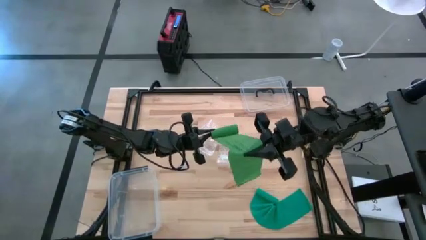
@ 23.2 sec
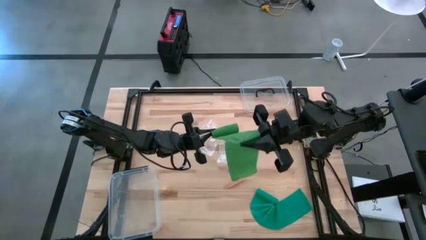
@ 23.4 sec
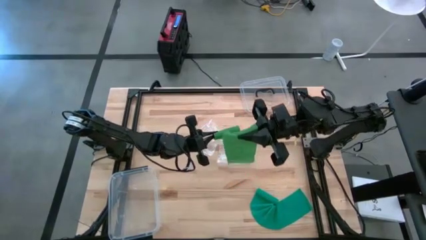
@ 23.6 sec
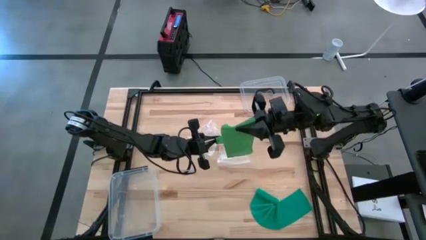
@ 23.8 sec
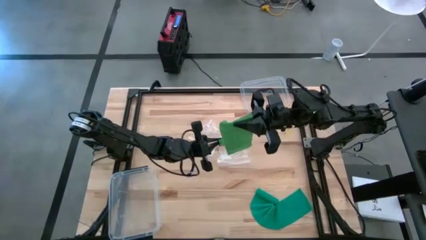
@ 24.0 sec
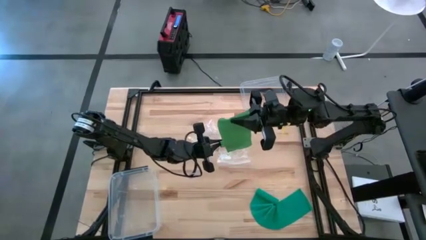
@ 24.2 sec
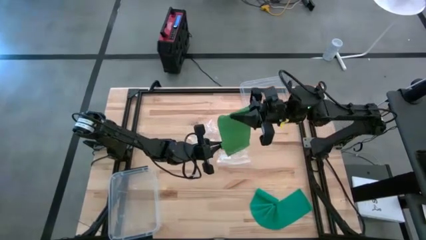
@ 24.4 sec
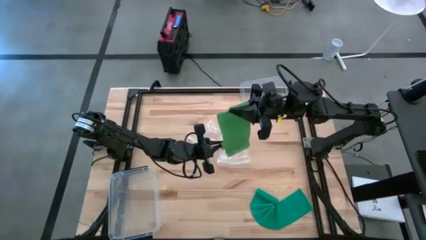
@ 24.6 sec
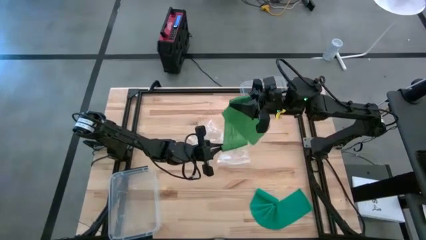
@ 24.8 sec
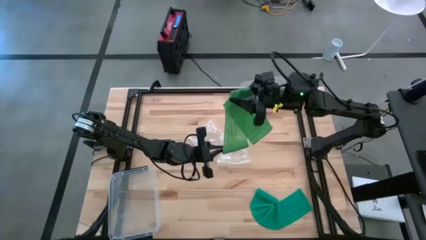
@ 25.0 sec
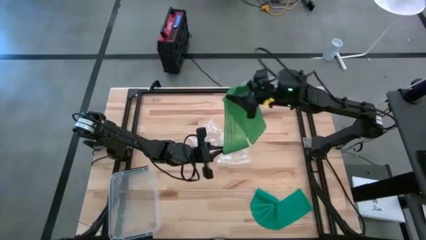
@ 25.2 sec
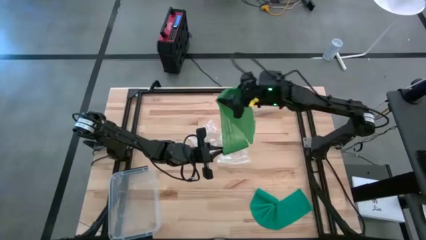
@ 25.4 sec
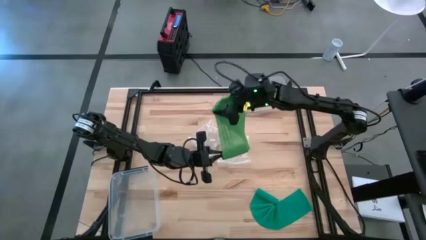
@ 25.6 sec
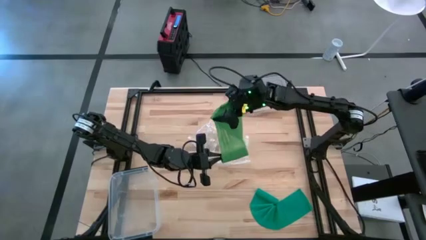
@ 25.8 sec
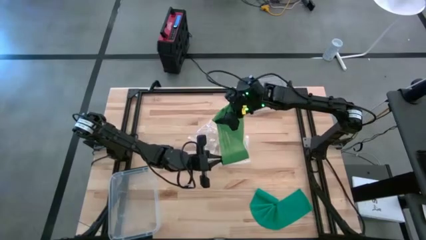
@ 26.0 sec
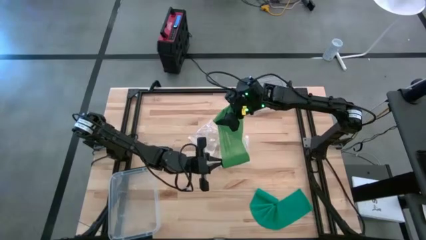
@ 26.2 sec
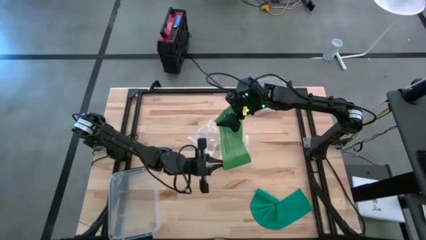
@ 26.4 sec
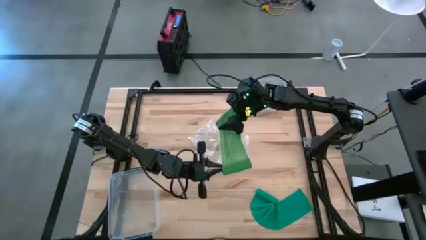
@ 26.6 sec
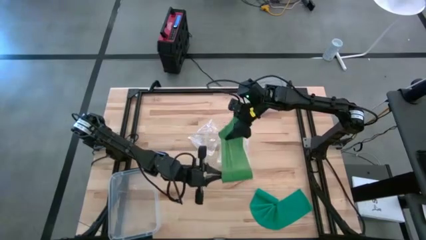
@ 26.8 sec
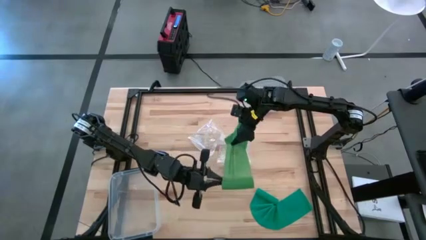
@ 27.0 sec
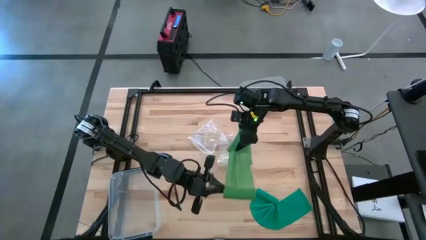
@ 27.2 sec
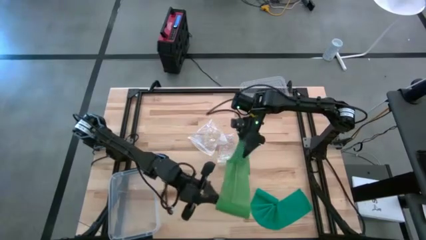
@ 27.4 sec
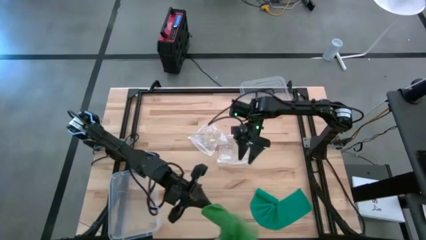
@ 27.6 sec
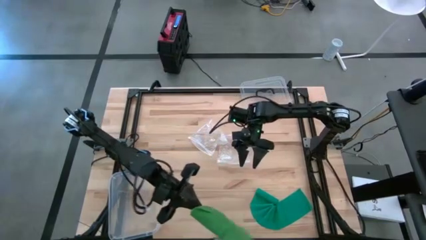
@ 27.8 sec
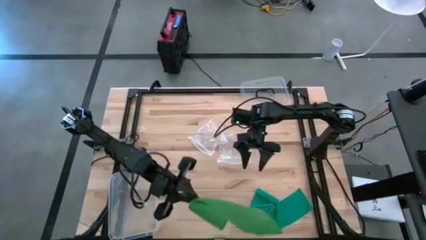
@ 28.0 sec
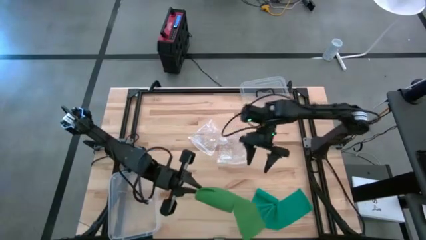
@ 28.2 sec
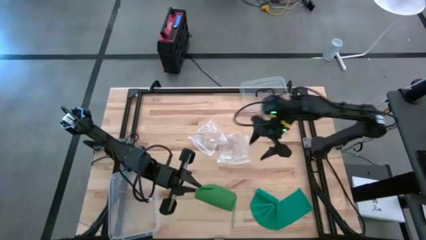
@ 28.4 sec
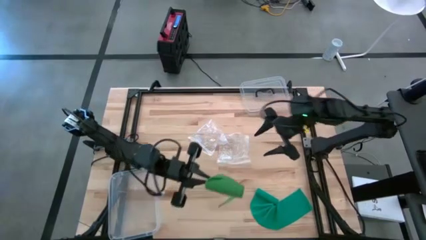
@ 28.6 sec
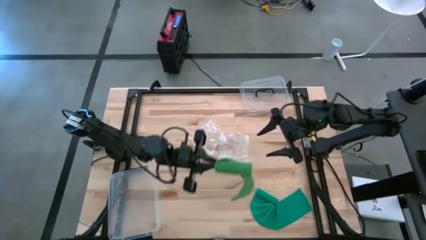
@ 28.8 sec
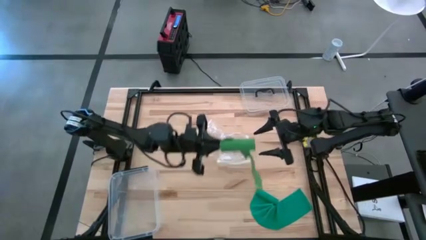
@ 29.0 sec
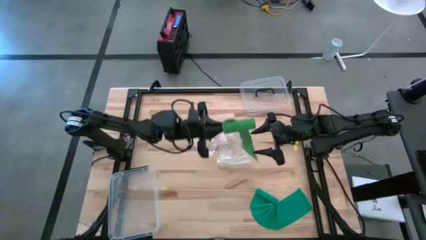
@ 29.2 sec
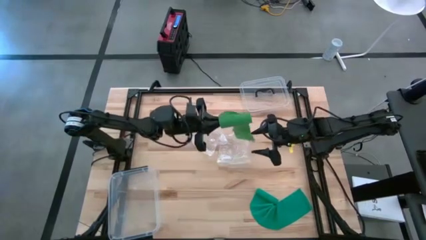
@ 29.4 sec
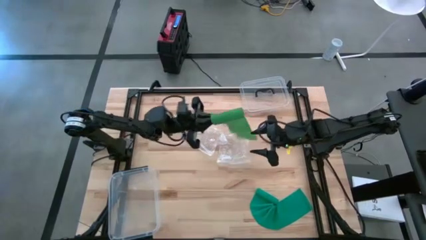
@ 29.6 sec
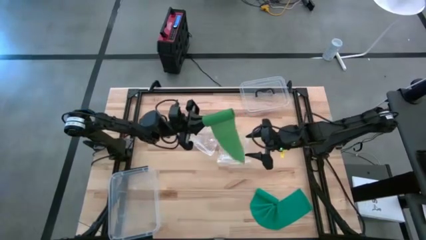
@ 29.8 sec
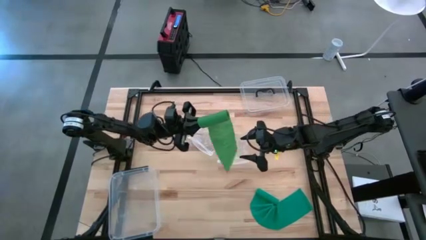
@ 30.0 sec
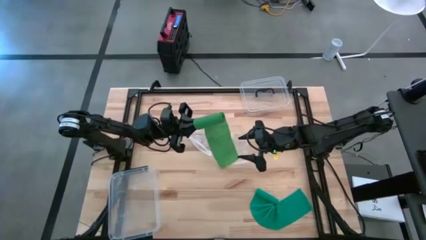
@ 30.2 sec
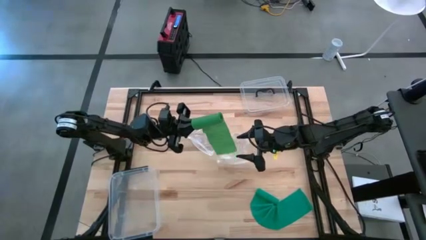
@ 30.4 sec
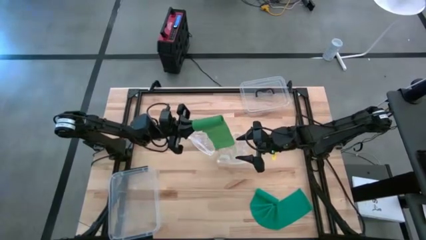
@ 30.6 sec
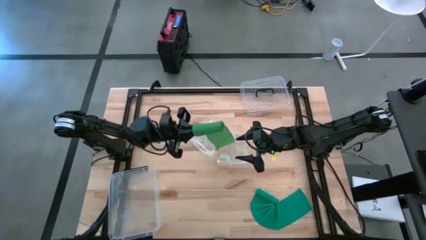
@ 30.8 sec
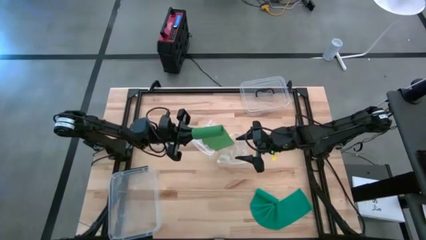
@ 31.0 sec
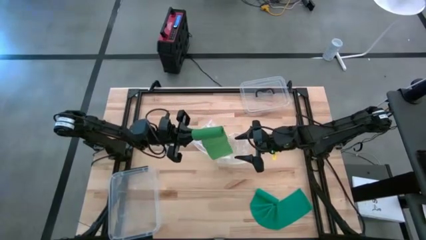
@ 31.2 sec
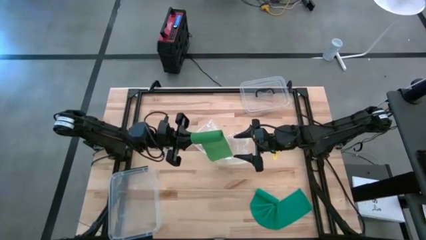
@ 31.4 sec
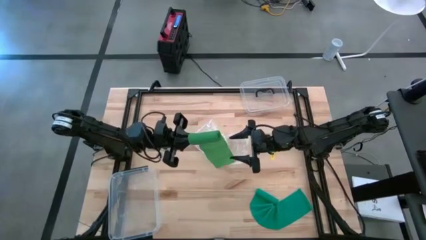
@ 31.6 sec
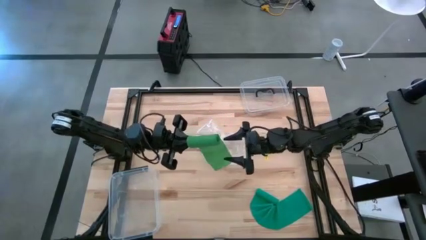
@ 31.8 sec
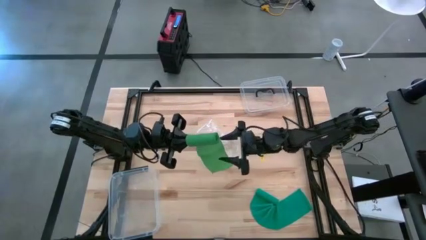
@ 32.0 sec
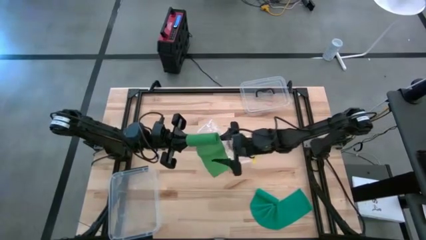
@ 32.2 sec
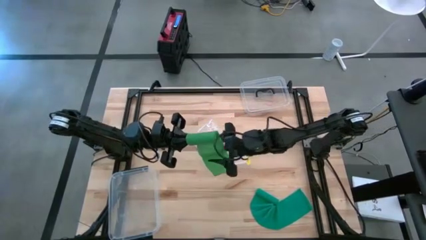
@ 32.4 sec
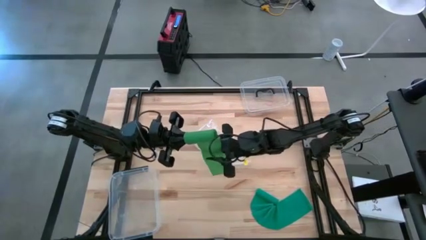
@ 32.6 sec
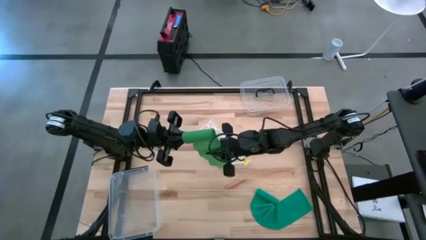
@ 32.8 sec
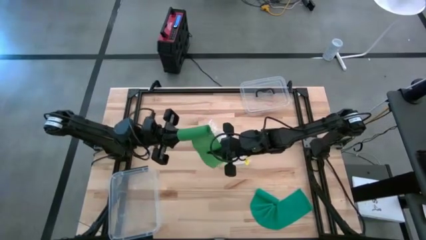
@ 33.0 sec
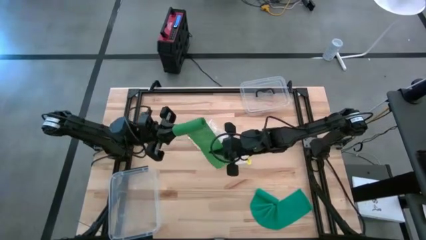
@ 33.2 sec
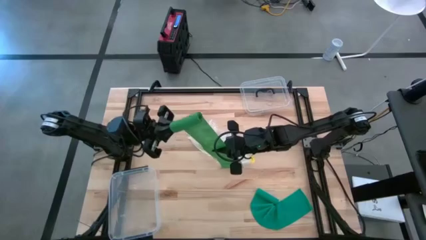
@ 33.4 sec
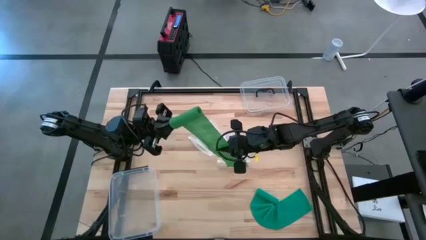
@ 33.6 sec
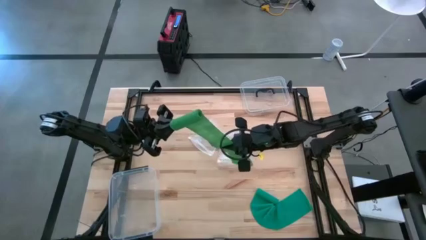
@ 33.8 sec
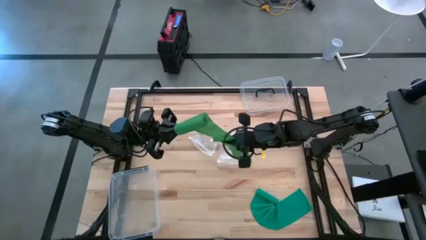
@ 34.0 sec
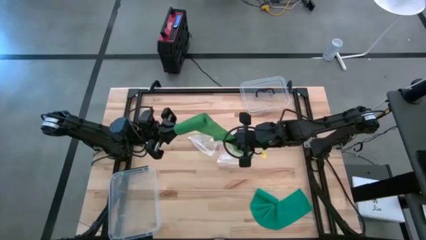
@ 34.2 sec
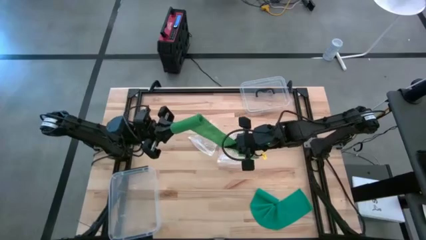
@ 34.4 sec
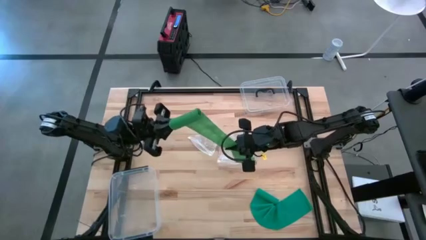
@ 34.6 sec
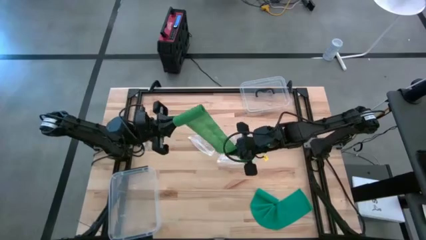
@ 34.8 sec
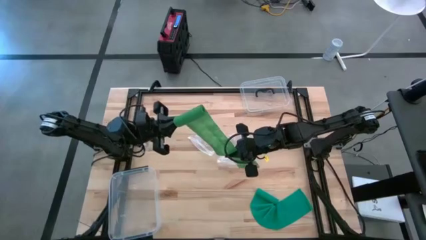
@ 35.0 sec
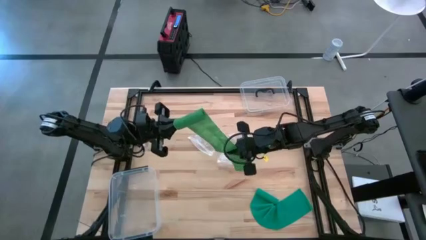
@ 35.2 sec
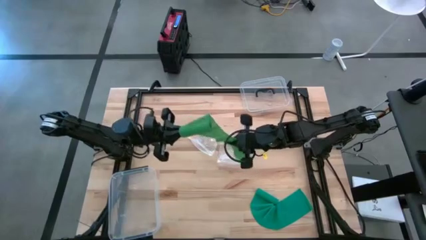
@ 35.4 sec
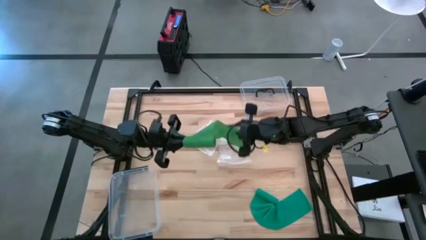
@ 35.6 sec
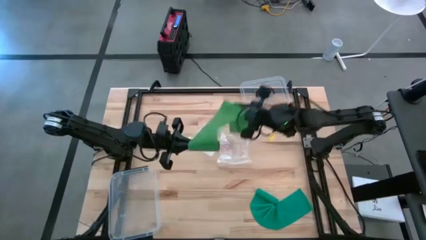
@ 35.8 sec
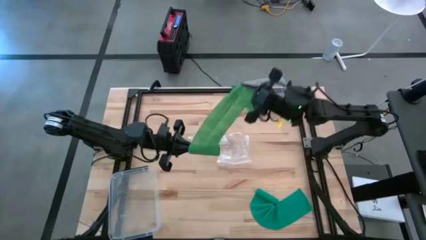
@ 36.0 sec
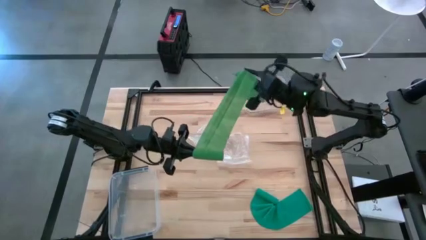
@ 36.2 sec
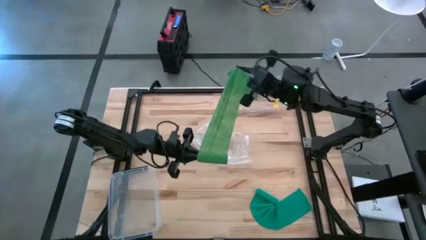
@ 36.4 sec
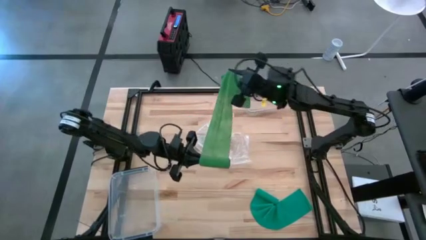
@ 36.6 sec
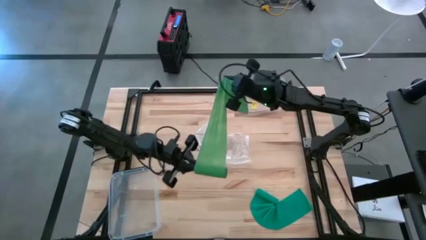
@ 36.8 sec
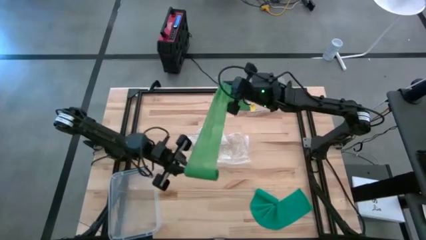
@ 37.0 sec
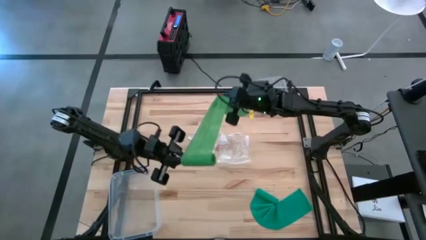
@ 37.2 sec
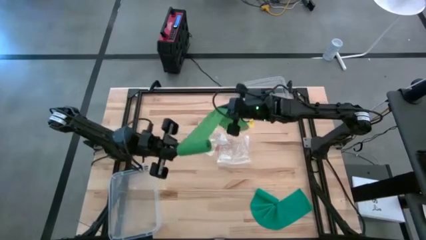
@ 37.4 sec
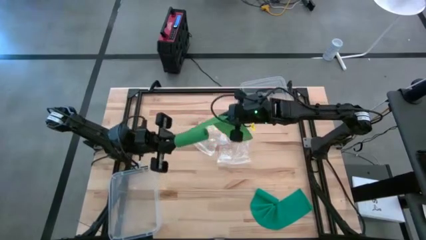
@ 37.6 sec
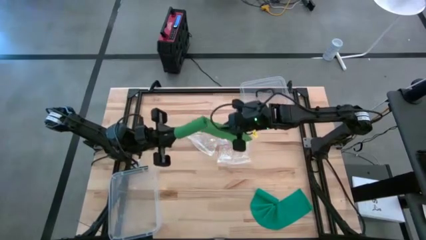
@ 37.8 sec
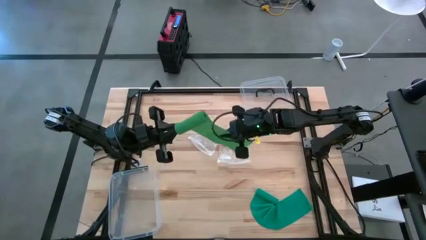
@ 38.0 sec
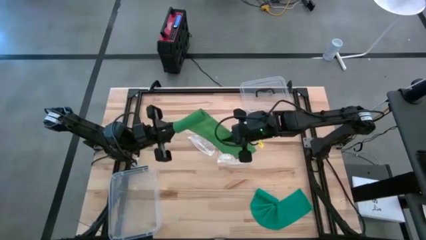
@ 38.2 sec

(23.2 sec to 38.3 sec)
Task: Roll bandage
Roll the green bandage

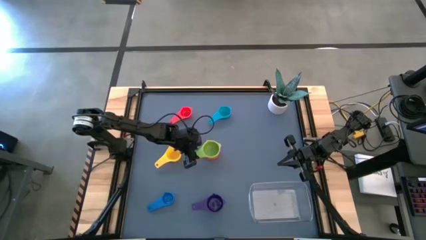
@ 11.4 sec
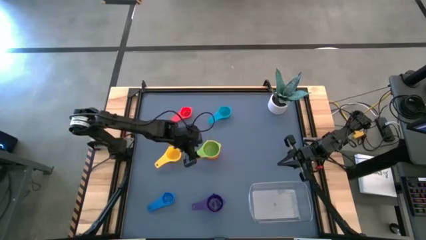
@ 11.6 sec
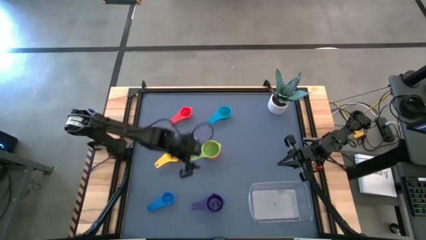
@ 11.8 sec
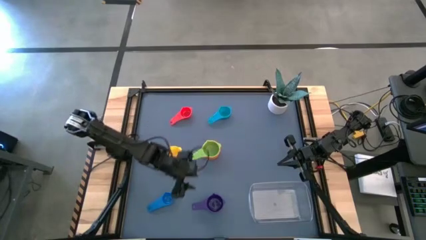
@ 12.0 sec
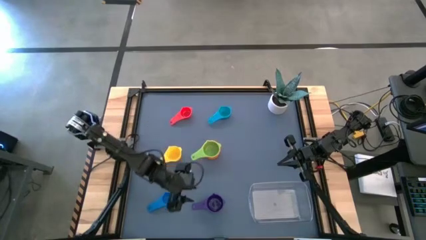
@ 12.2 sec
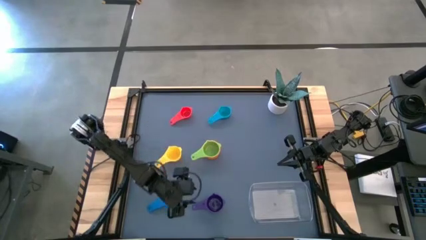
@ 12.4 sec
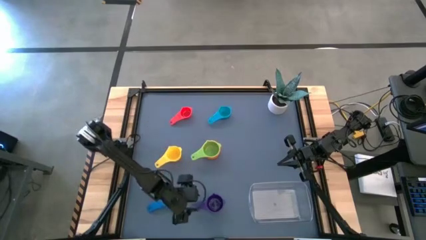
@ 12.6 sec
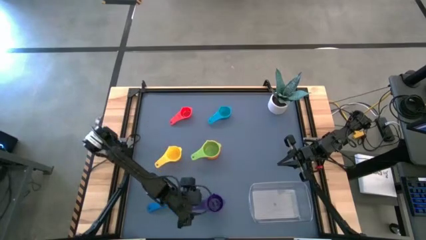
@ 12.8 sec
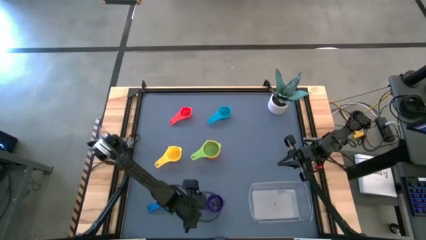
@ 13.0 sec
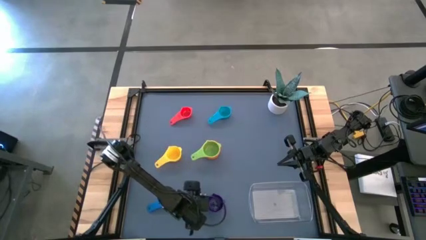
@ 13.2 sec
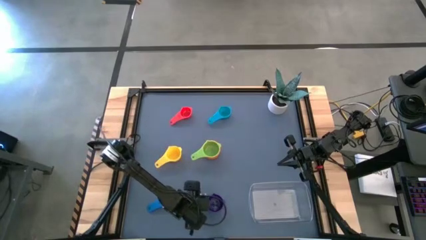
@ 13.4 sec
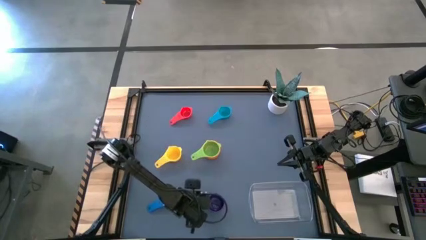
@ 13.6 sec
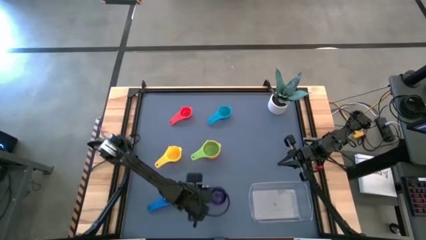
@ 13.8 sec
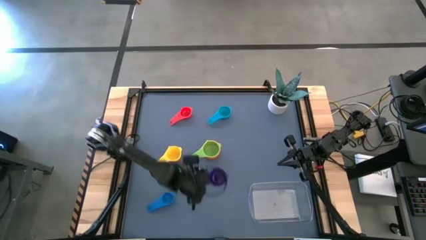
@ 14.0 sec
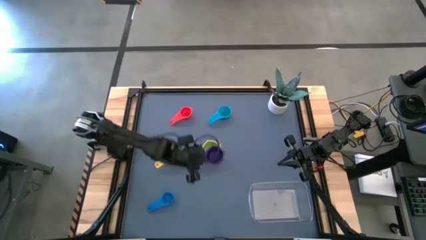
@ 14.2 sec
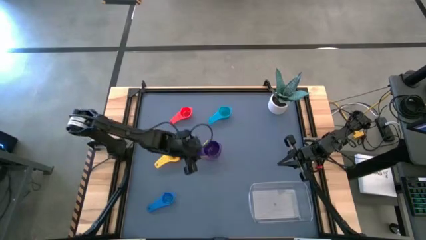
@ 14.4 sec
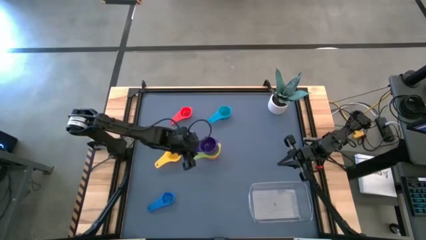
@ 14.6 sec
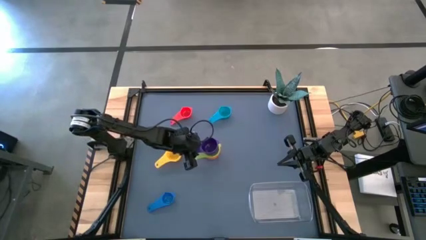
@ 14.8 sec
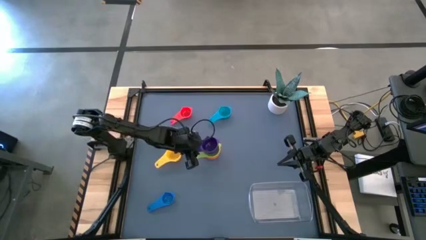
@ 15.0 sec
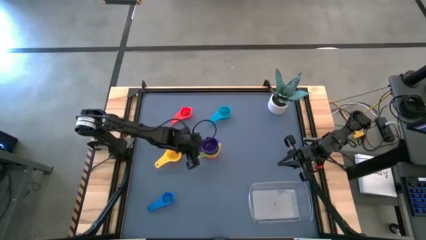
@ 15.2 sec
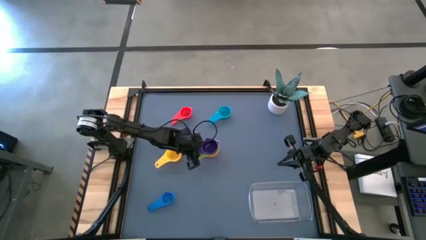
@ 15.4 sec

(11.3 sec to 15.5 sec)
Task: Nest measuring cups in basket
Stack the violet measuring cup on top of the light green measuring cup
